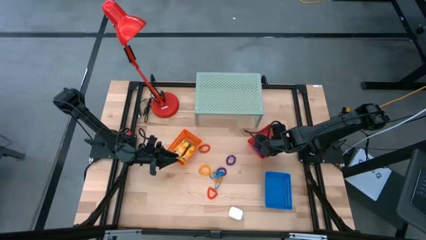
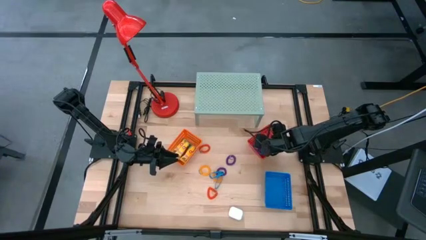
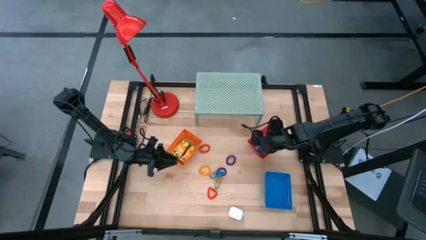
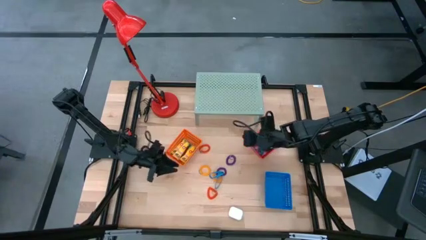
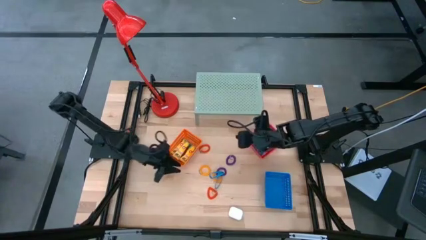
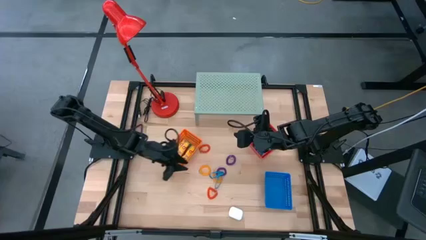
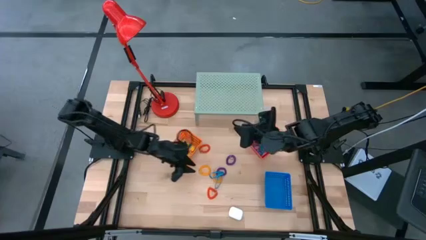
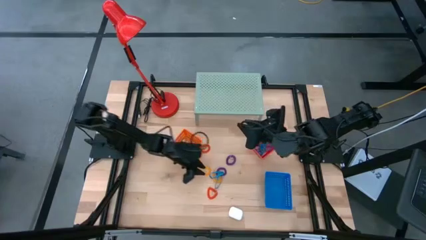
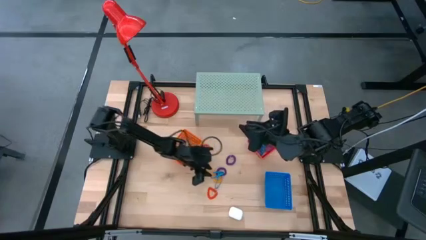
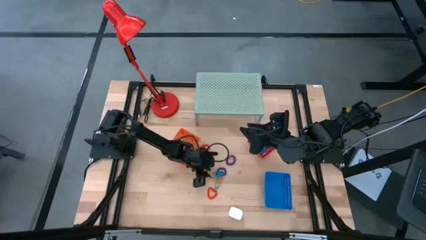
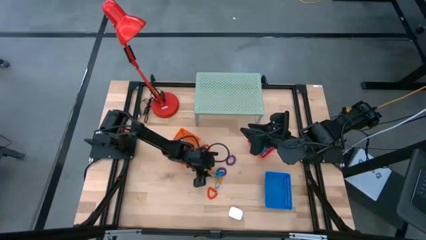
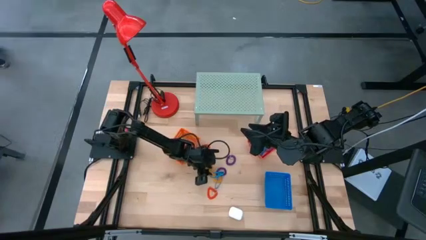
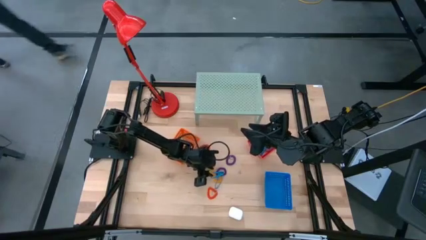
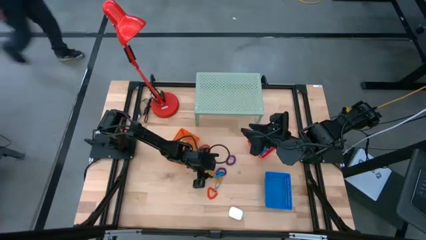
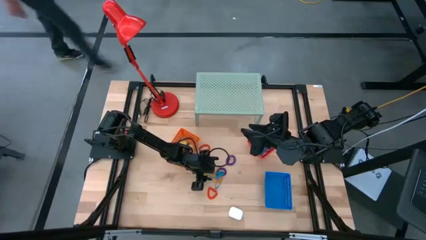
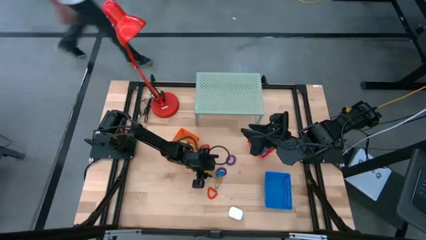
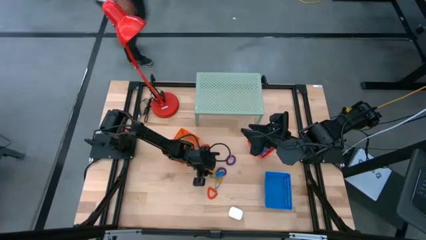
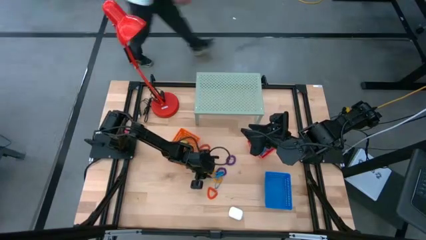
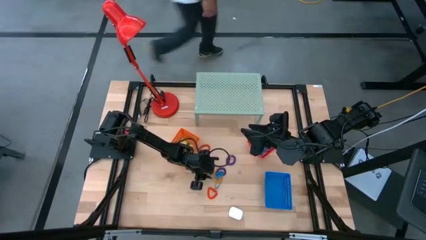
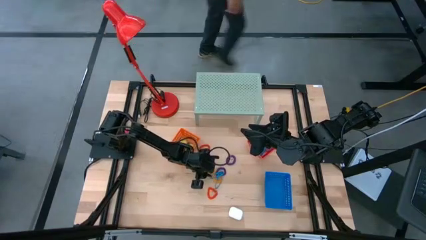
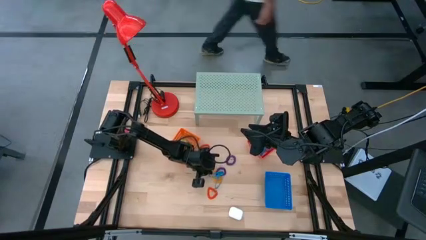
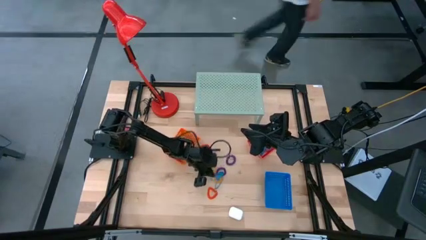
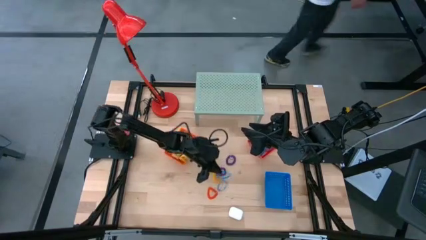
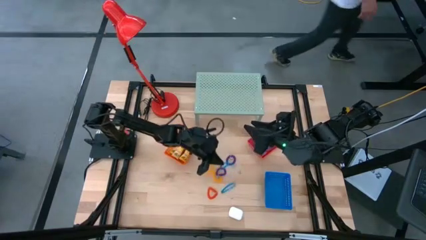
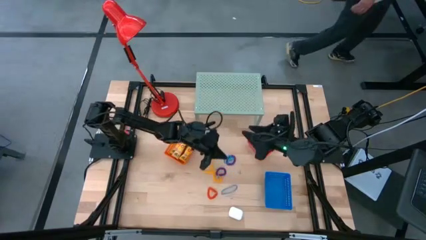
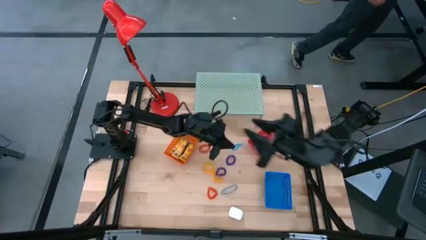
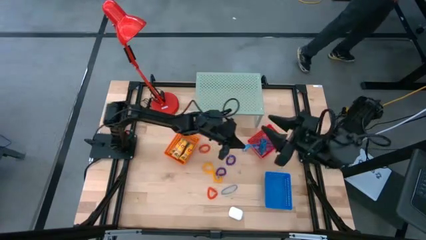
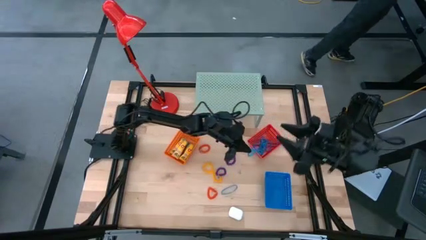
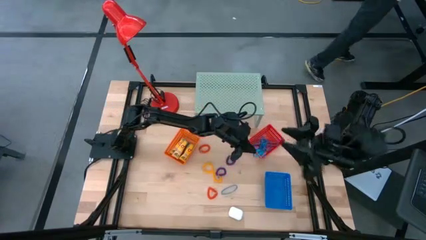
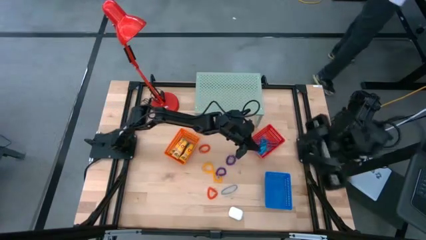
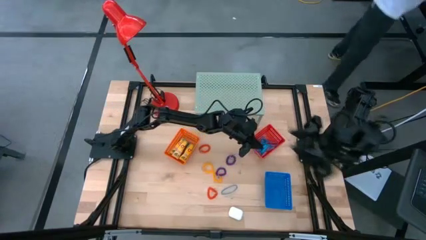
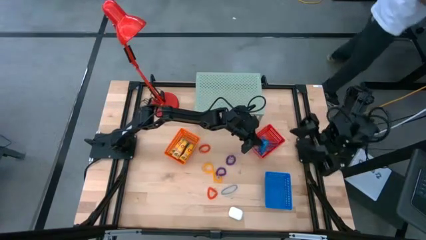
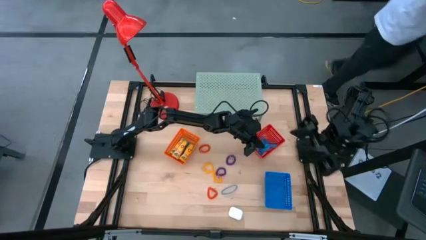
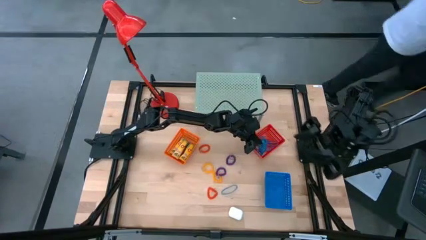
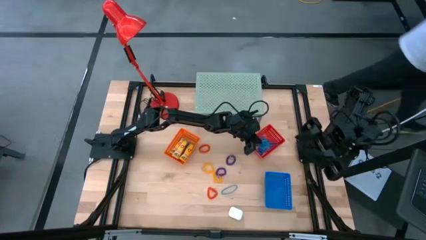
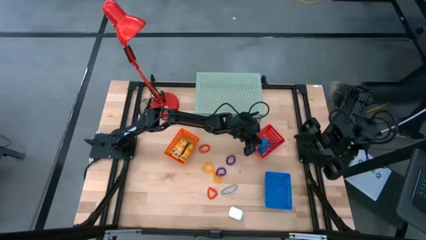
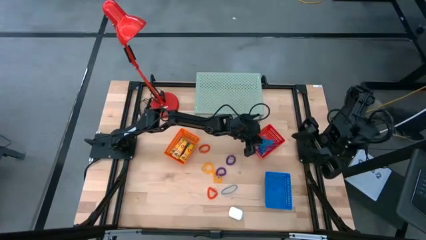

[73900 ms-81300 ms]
Task: Pick & Place Office Desk Supplies
Put the blue rubber band into the red bin

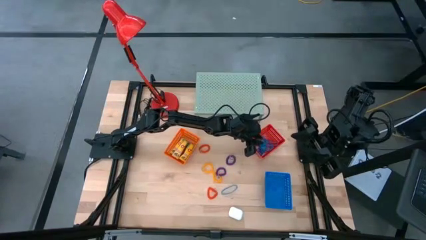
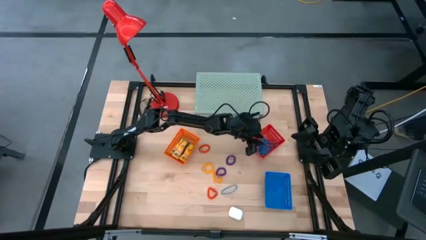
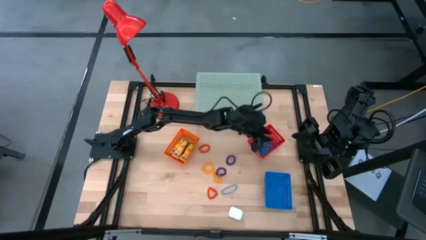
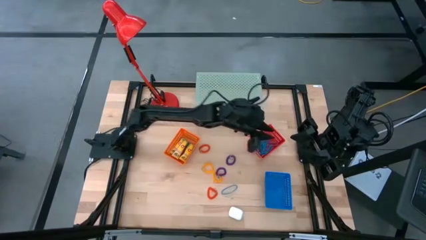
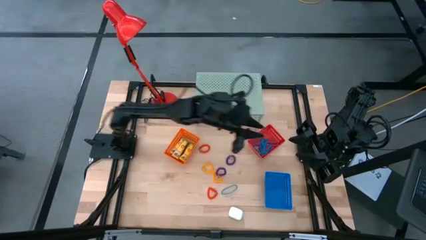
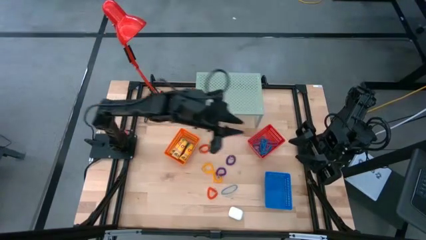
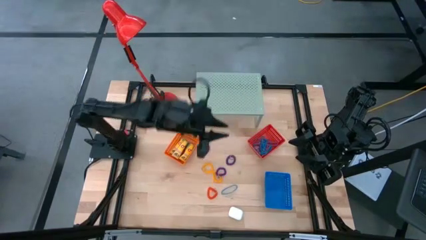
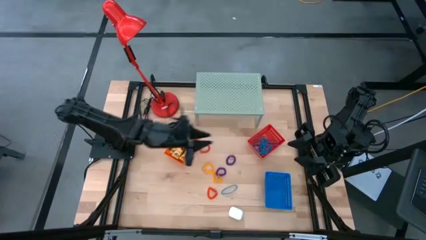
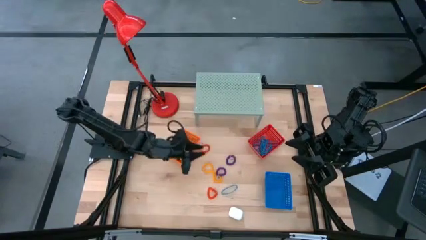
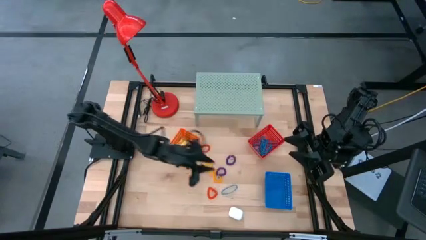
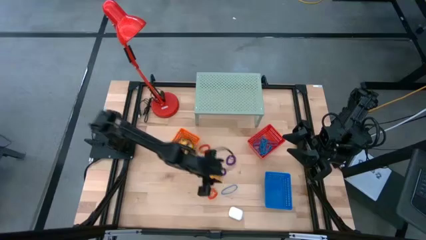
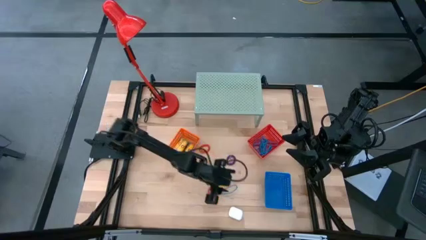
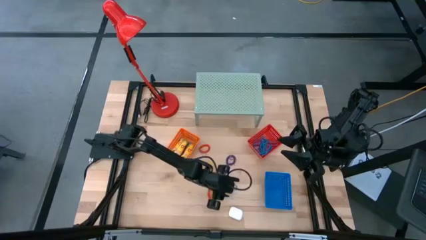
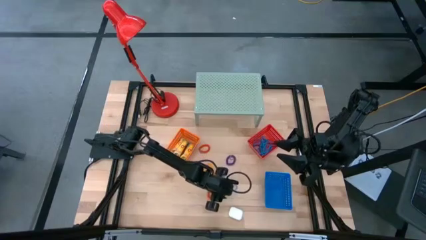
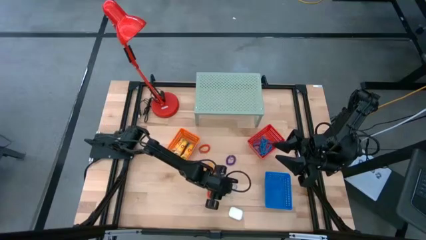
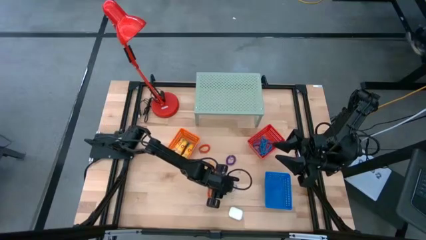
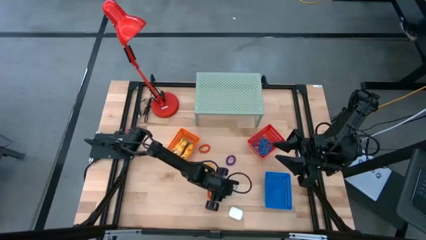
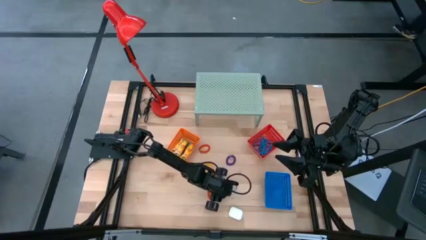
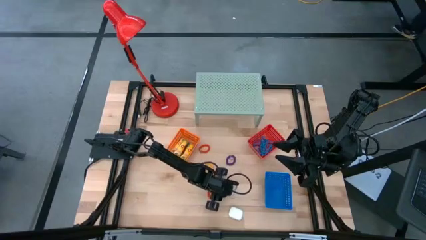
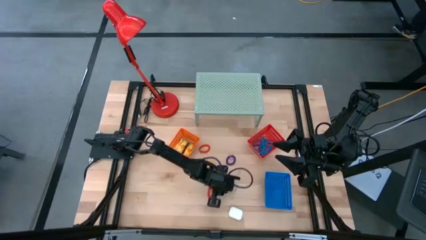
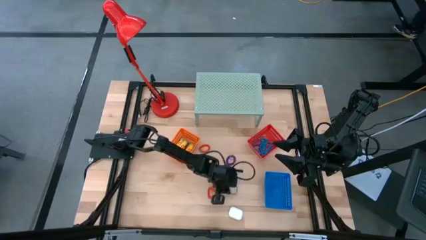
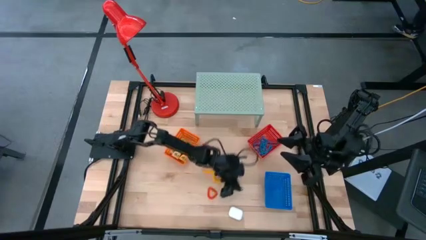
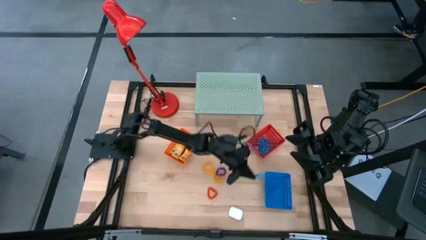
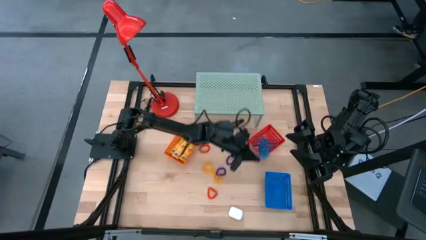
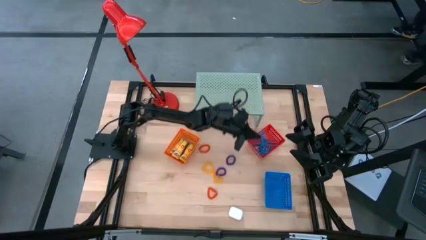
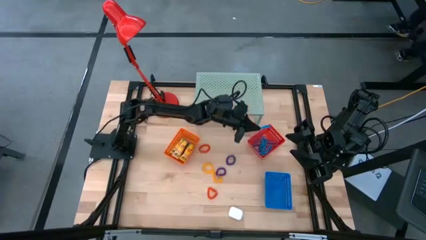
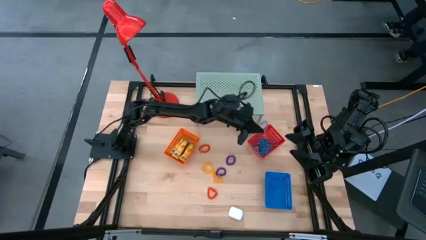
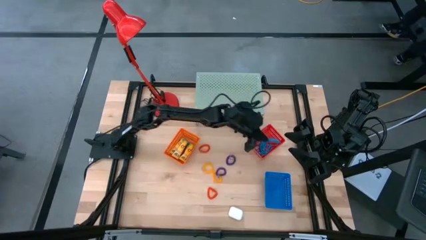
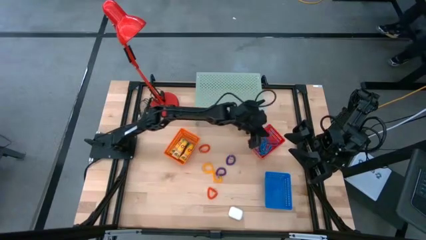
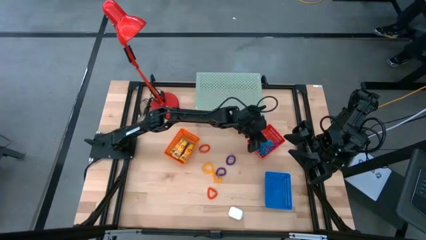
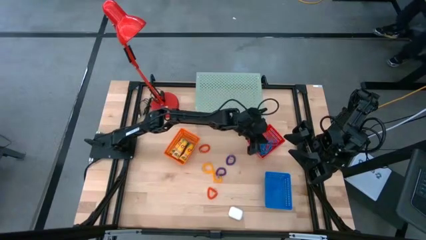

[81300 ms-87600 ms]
Put the blue rubber band into the red bin

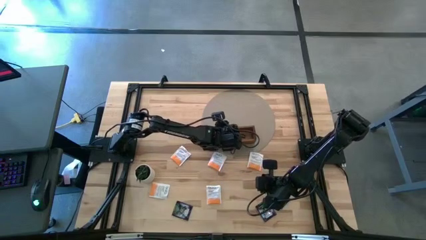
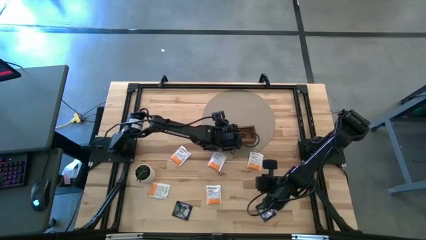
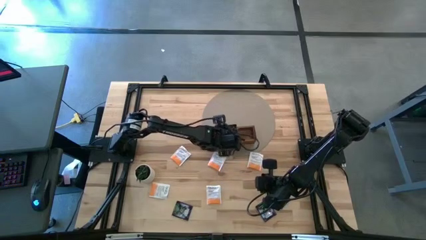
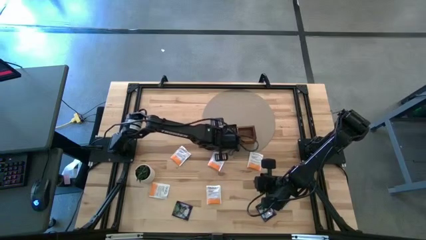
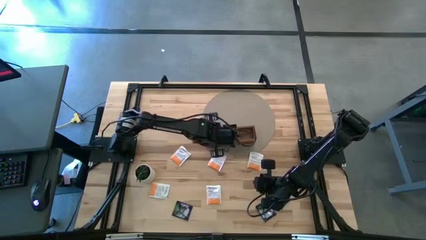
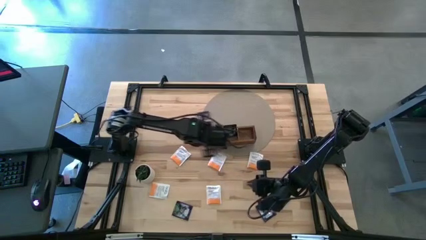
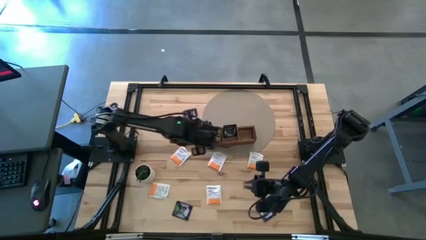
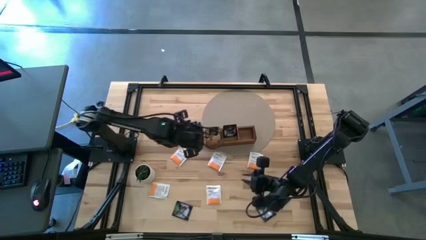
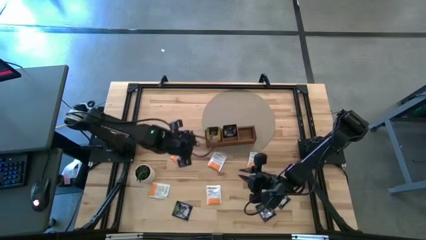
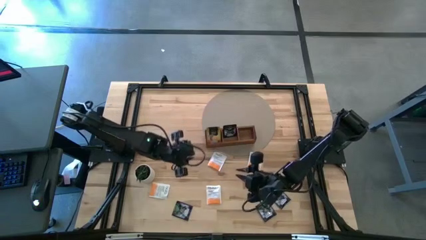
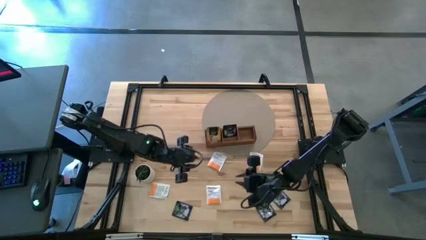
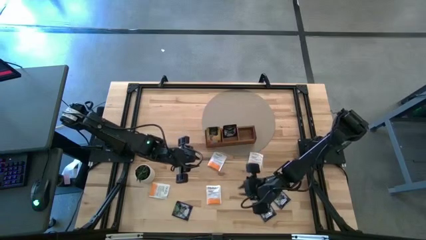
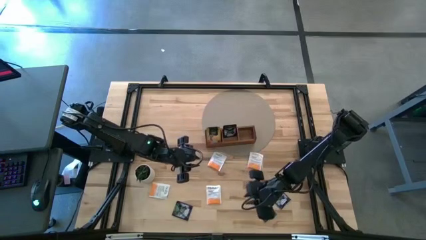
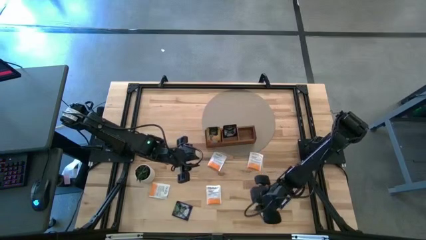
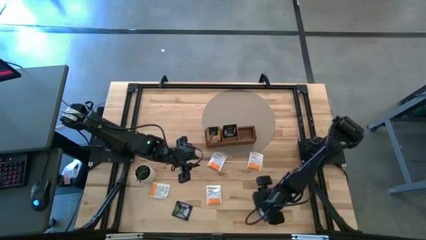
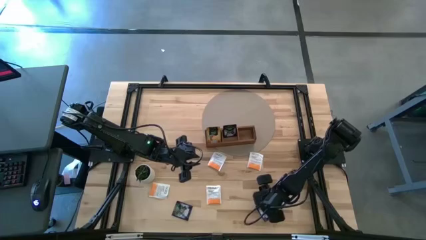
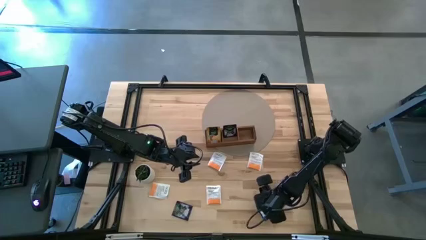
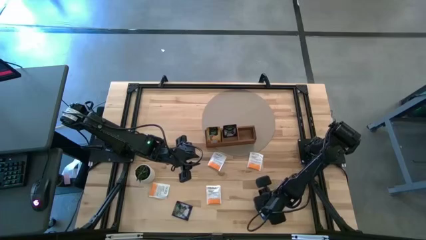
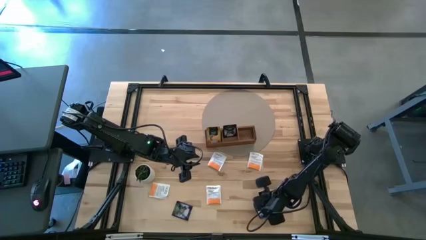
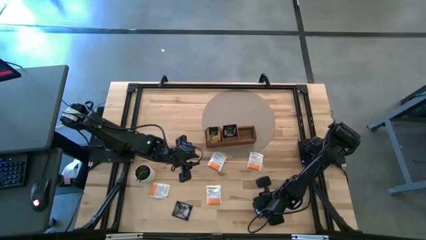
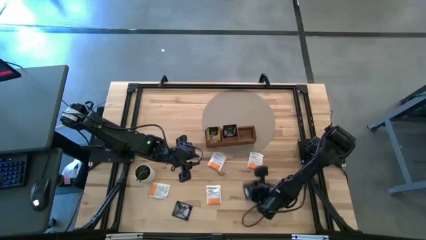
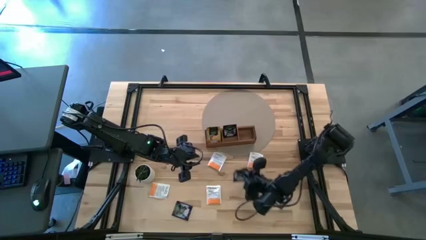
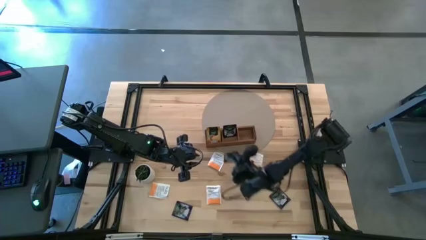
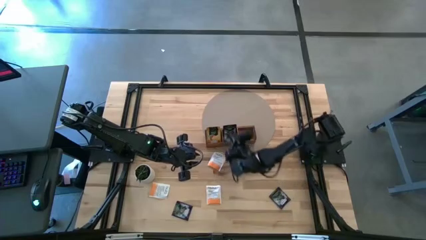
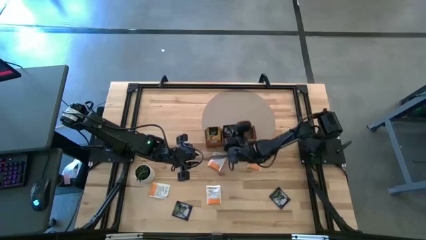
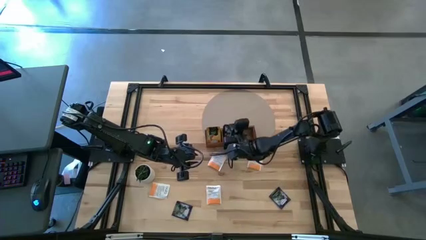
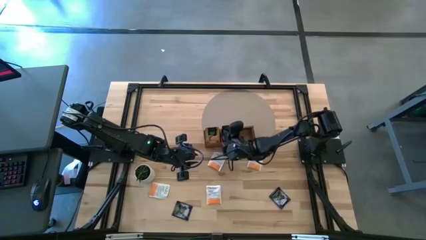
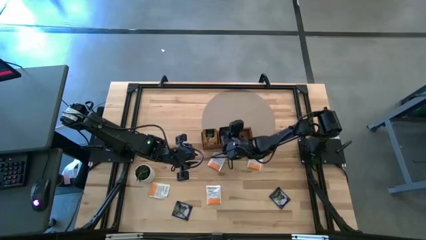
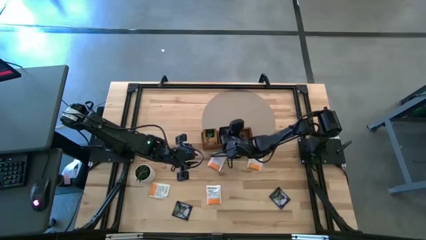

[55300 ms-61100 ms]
Task: Pick & Place Tea
Put the violet tea bag into the middle section of the wooden organizer
